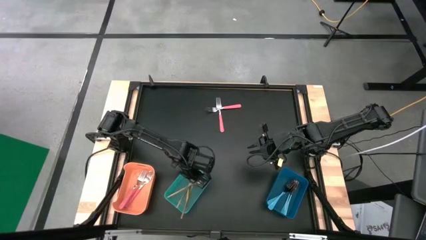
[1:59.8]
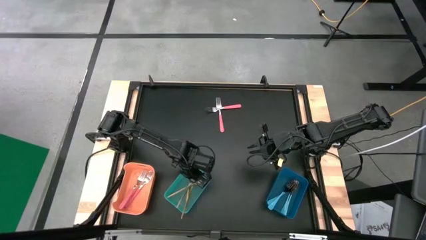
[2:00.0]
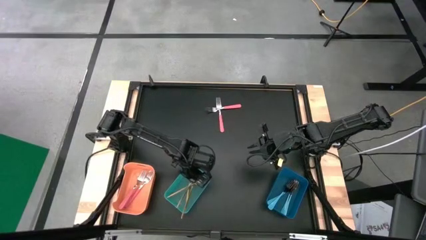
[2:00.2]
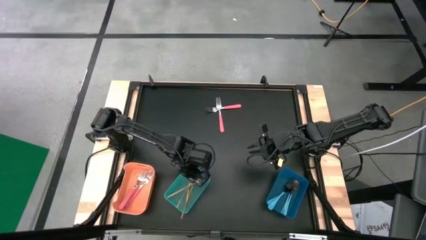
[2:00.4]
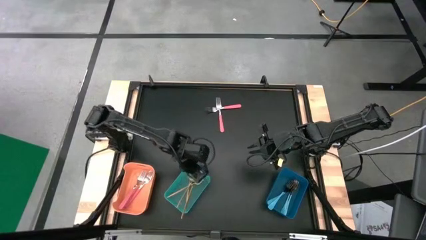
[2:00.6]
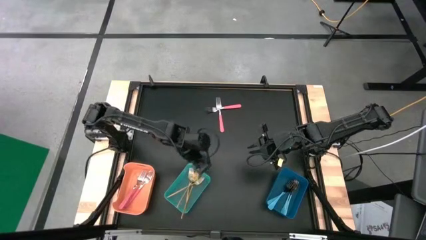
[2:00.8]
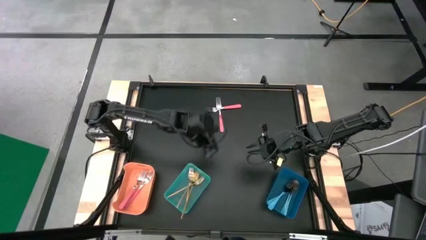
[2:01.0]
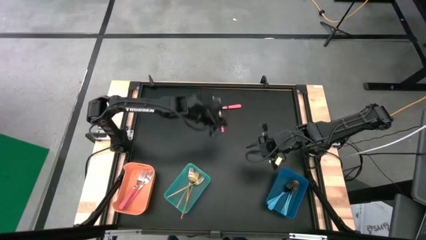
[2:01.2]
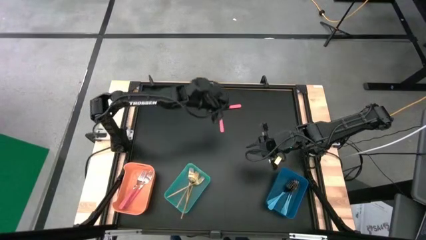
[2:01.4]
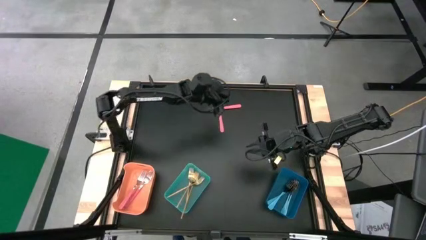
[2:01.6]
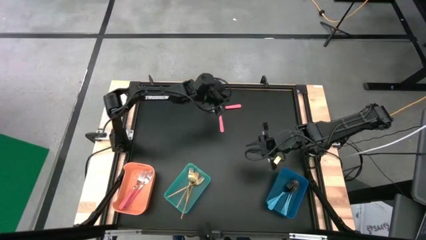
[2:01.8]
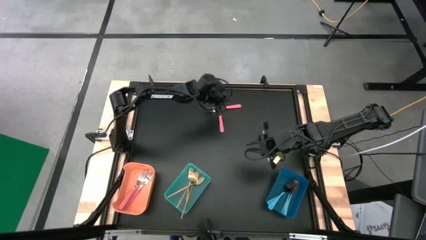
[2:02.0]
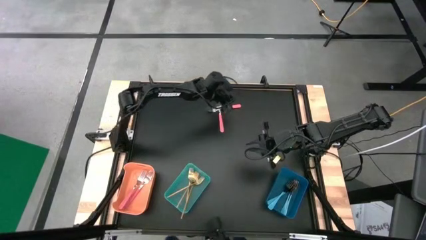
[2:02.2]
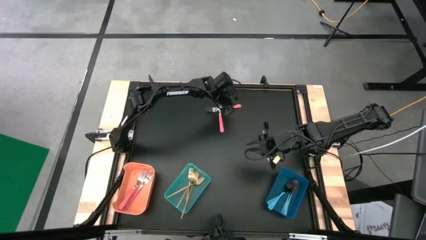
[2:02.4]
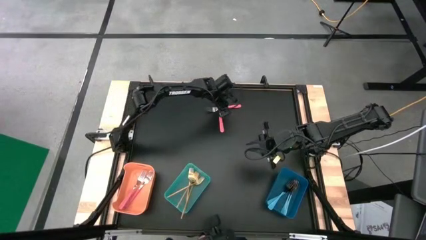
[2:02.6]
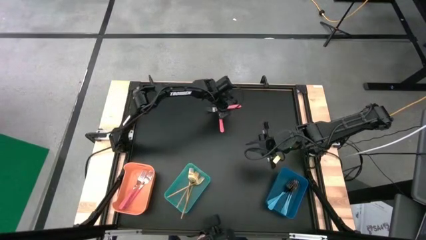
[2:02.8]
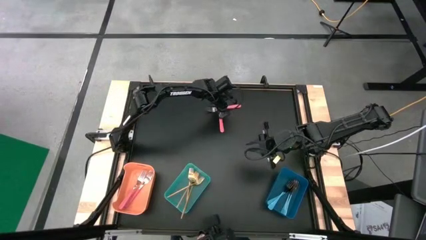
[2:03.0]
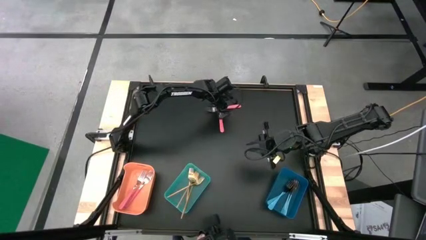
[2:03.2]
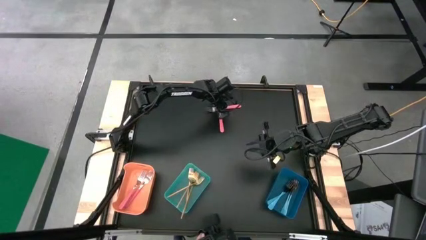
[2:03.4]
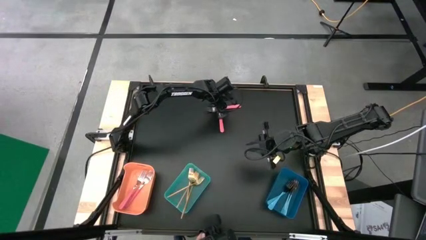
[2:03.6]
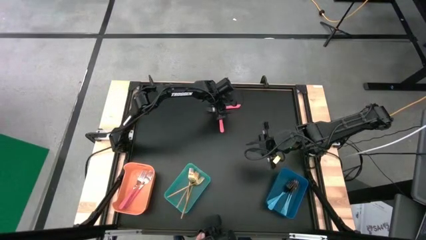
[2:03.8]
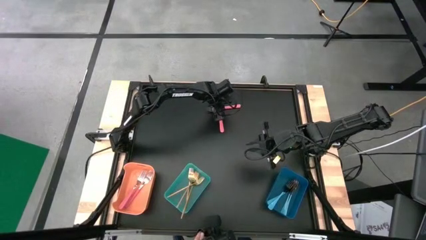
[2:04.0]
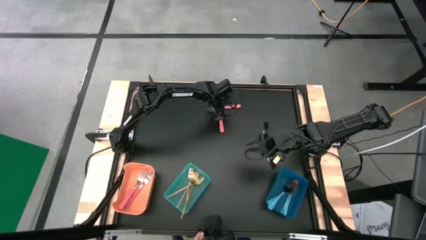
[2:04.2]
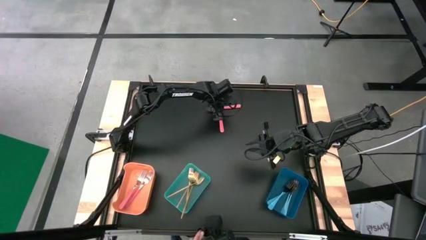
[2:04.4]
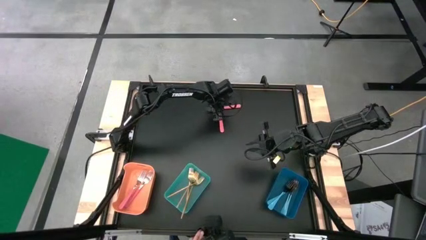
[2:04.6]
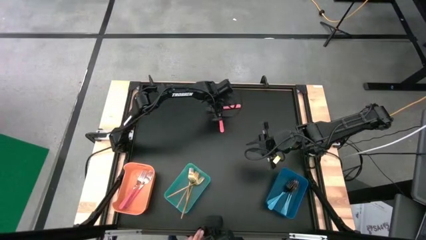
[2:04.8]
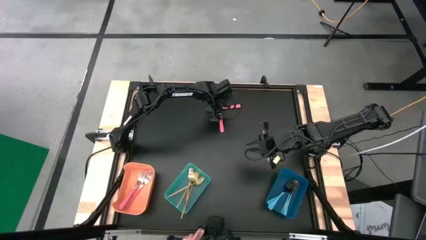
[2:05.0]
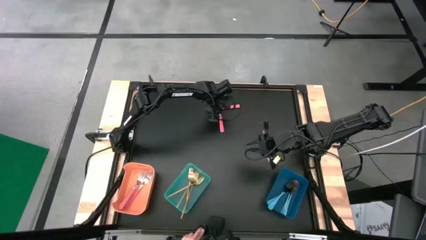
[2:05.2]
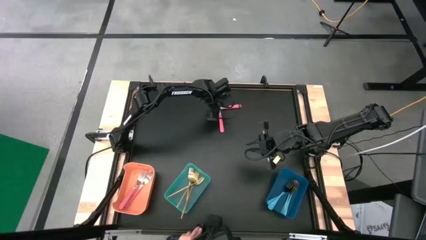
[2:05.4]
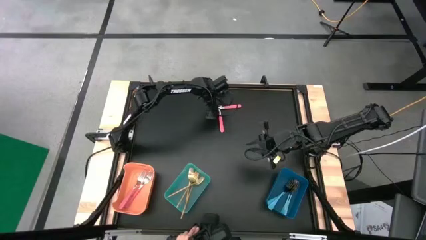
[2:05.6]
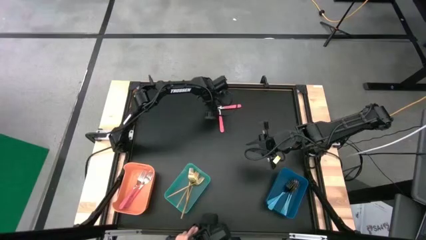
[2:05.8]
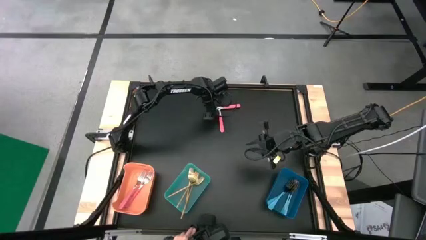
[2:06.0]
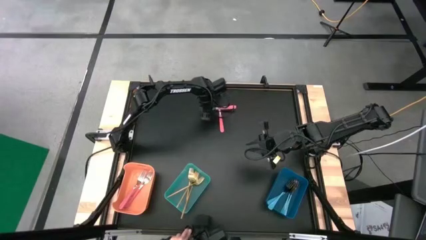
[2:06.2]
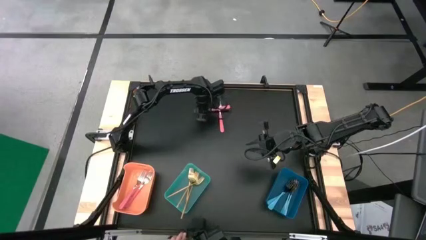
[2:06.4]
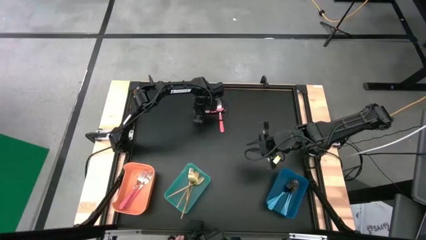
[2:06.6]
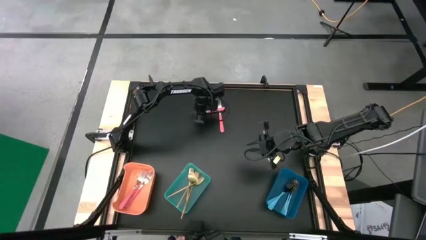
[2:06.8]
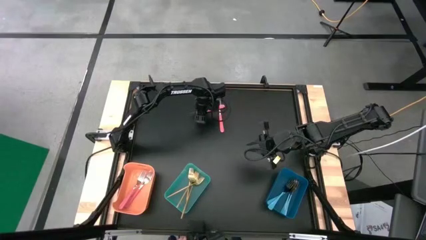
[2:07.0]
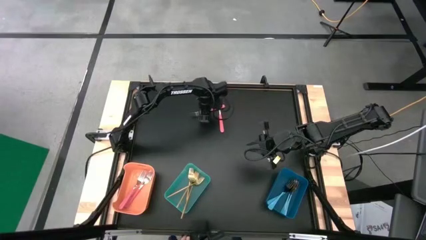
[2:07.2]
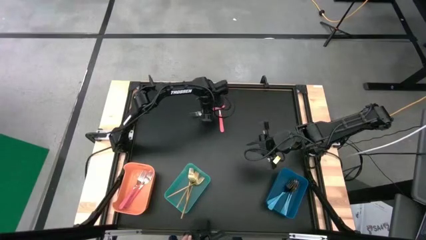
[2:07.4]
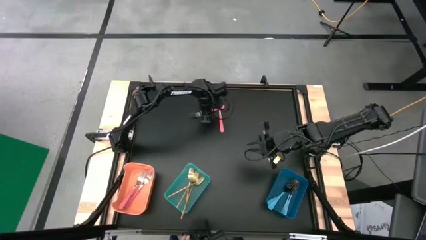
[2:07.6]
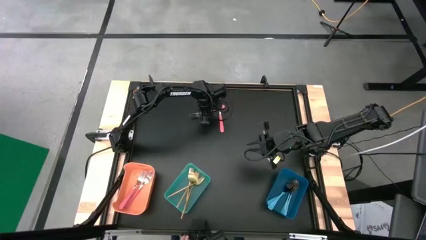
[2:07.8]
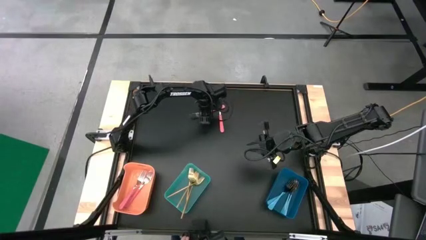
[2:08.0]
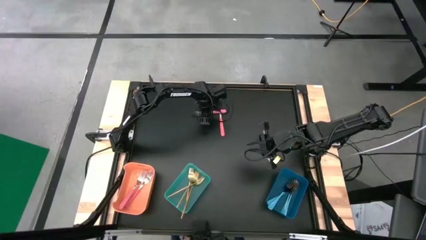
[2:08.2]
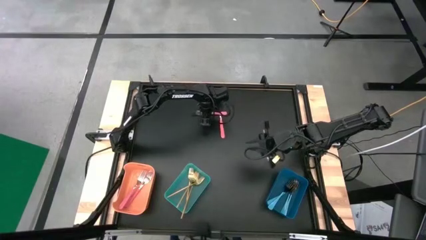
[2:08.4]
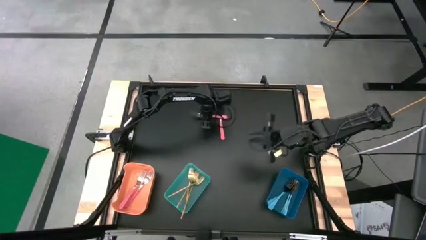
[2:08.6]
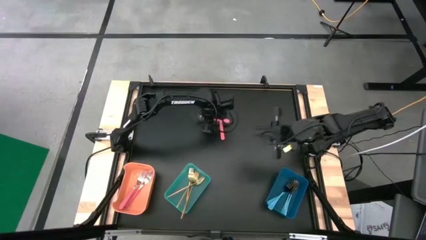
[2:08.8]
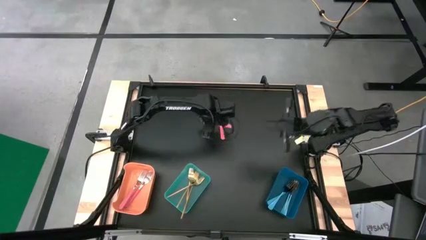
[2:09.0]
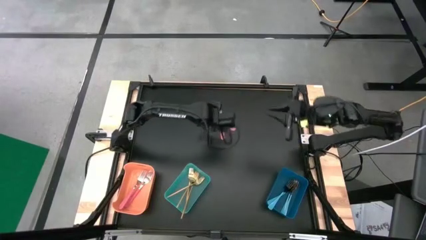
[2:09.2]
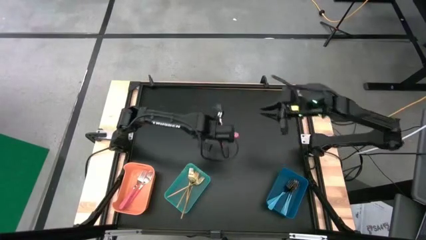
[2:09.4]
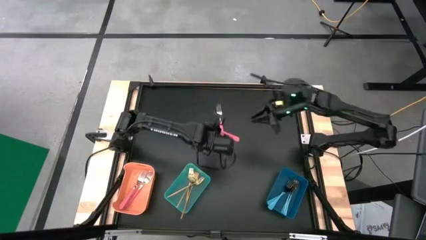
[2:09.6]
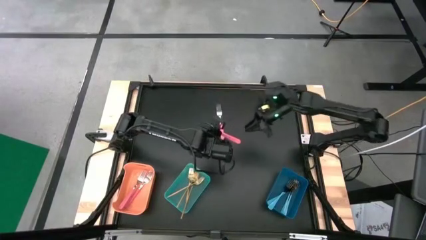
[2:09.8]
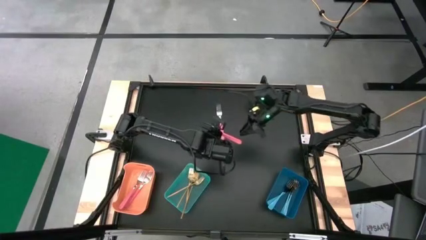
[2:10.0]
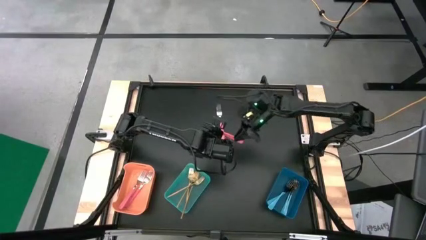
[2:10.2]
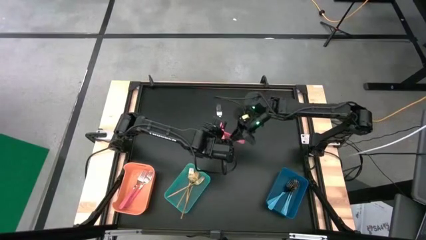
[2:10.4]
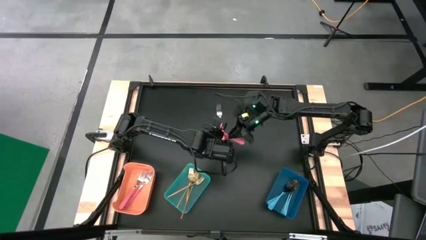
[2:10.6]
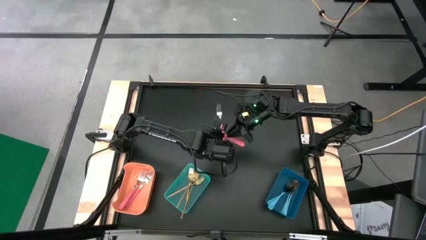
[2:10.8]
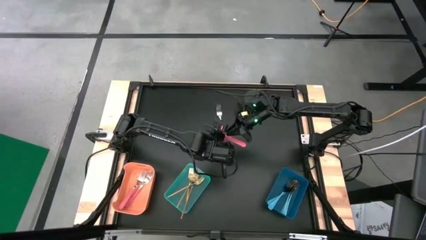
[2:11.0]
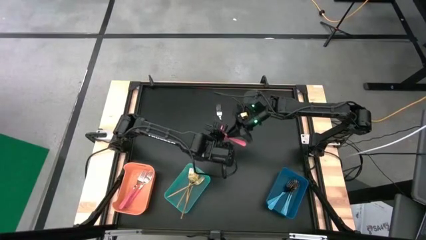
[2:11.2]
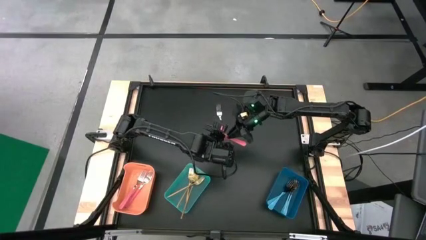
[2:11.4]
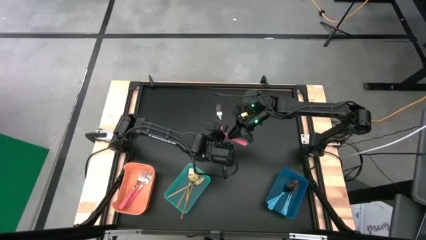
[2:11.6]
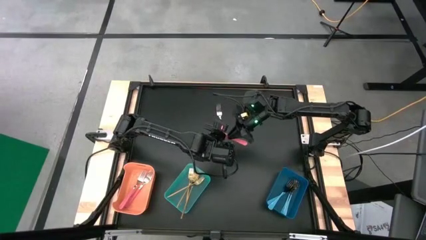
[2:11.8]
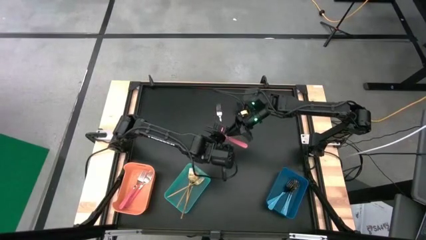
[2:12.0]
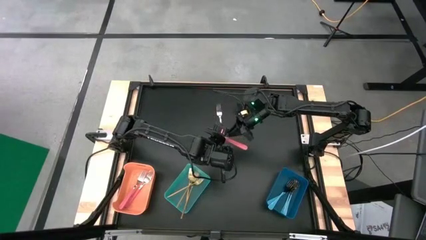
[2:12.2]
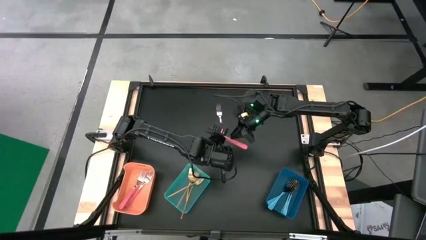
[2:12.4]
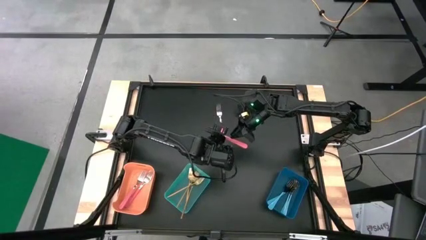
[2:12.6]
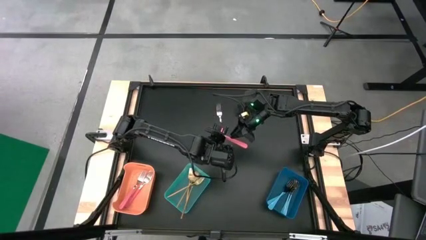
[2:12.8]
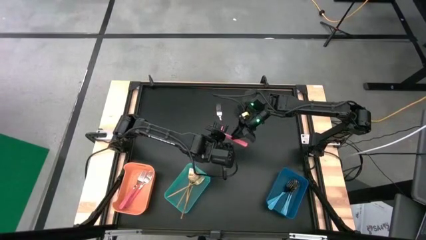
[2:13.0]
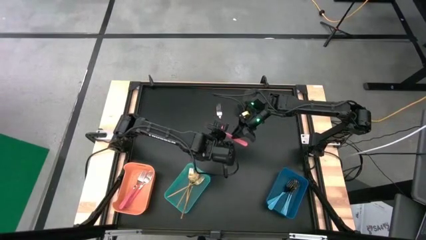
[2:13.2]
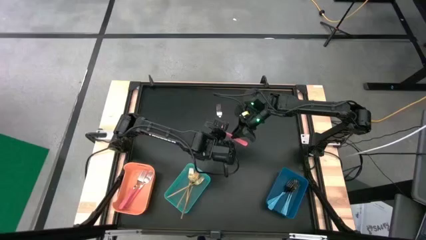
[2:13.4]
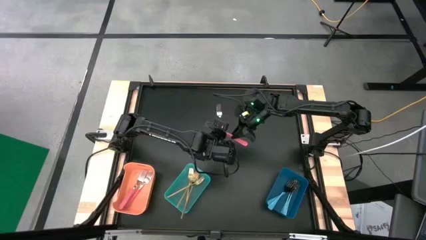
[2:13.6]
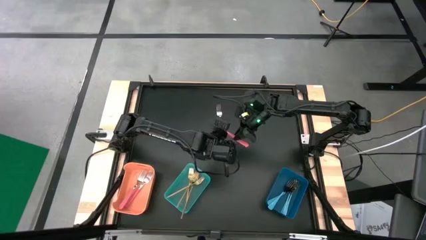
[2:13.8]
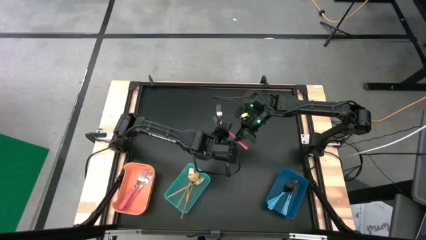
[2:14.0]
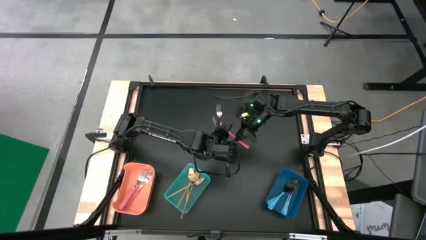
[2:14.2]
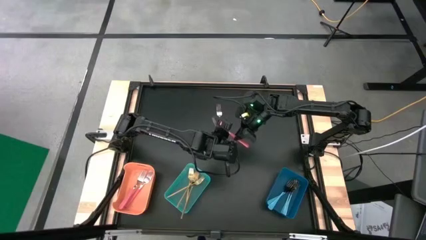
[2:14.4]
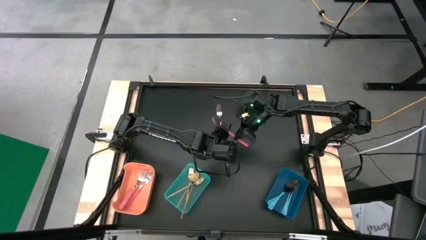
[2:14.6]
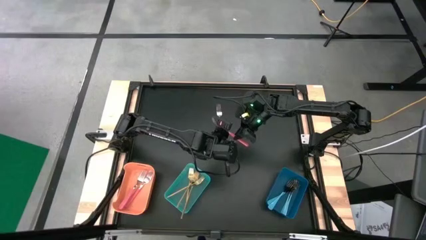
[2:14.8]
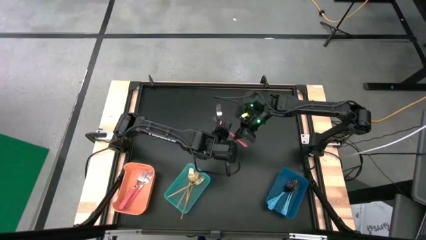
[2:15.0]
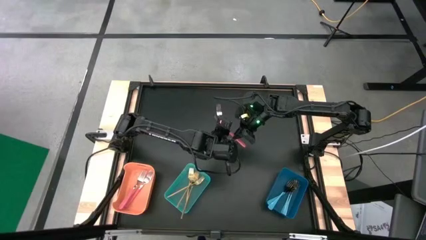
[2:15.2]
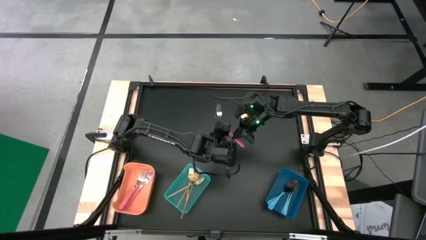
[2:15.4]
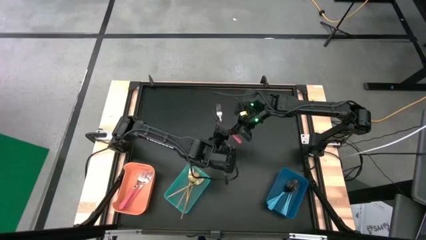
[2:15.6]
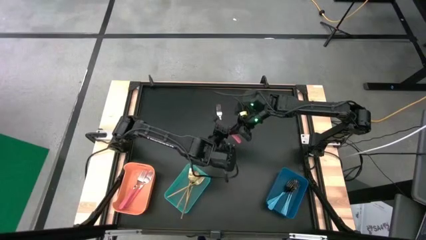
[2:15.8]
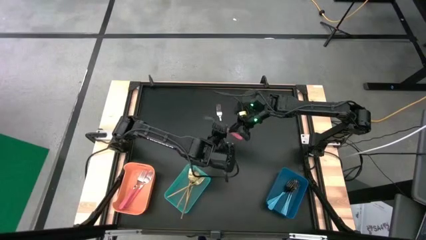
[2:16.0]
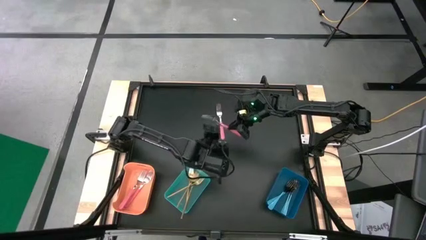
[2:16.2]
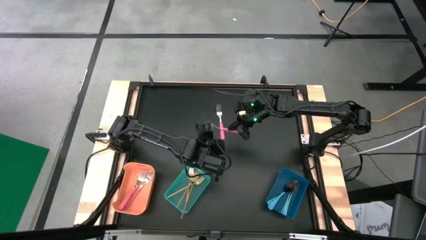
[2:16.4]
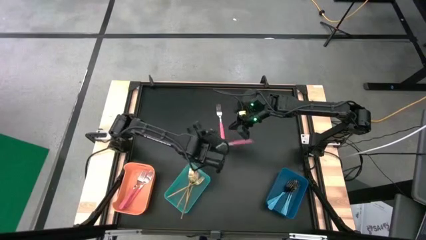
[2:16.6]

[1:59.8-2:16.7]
Task: Sort silverware by color (type)
Put the pink fork into the orange bin

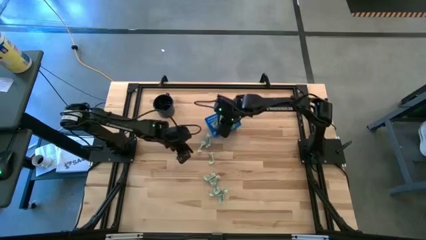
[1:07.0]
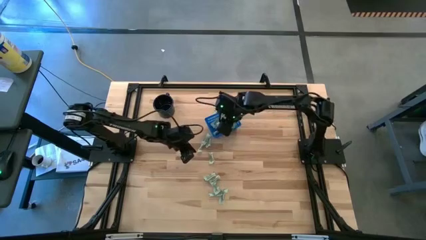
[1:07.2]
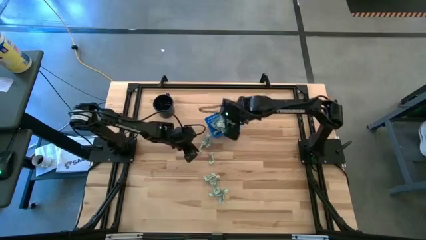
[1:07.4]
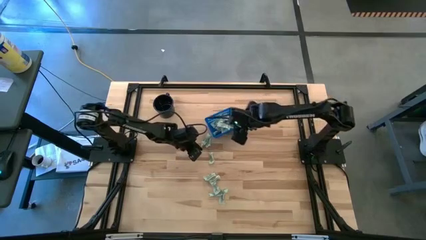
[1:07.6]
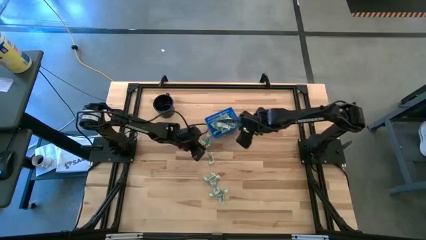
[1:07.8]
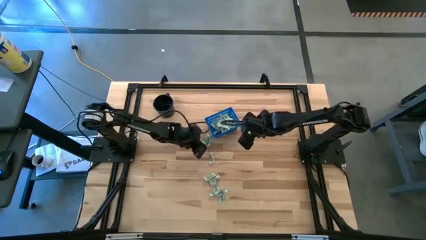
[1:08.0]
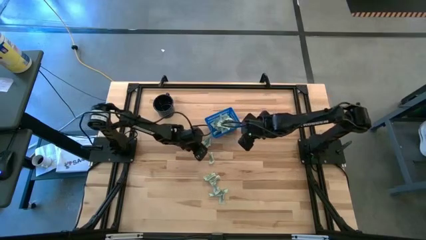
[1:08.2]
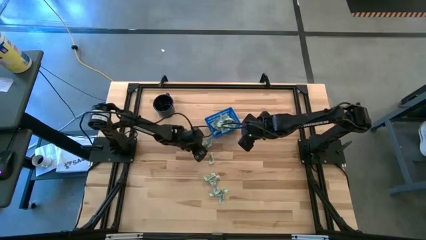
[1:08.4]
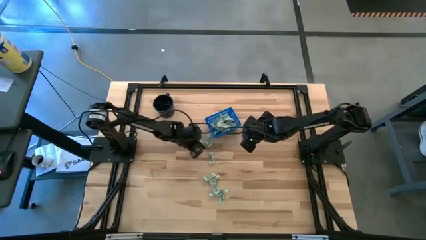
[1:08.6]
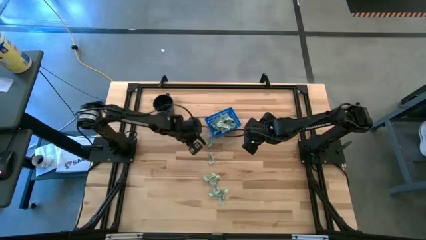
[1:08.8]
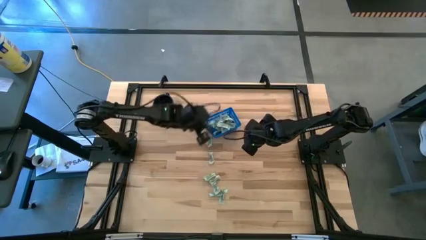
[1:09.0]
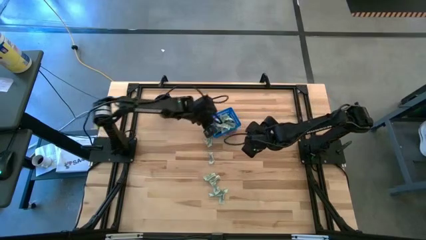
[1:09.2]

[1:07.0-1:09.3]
Task: Pick and place Stevia / Truvia into bins
Put the green stevia packet into the blue bin
